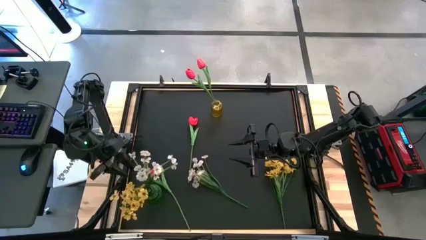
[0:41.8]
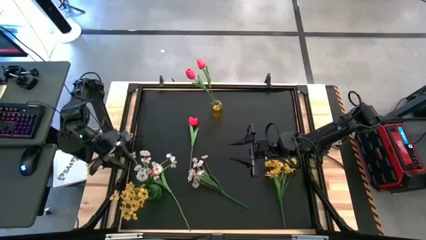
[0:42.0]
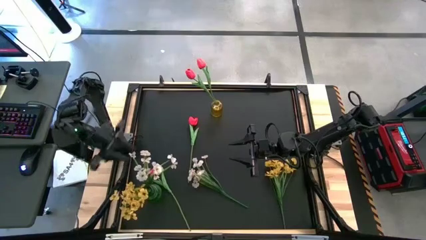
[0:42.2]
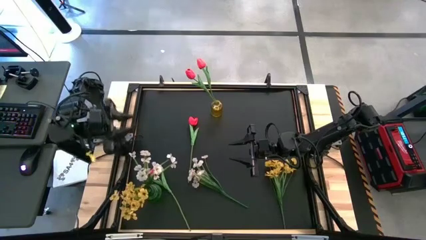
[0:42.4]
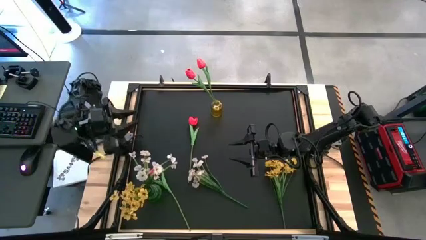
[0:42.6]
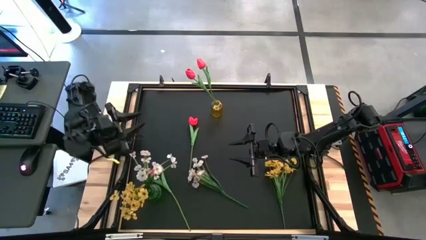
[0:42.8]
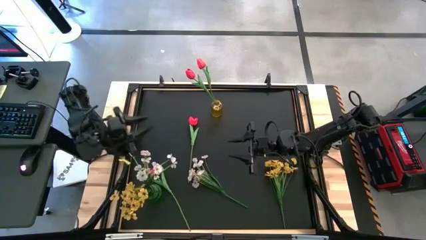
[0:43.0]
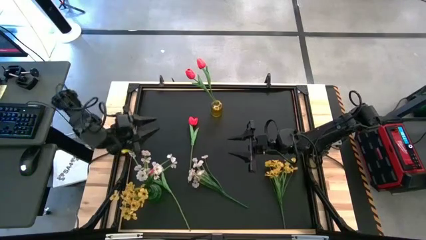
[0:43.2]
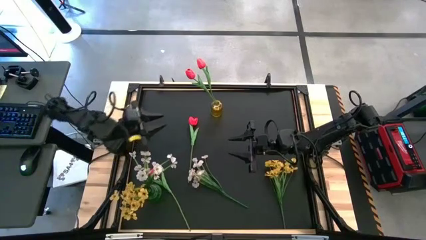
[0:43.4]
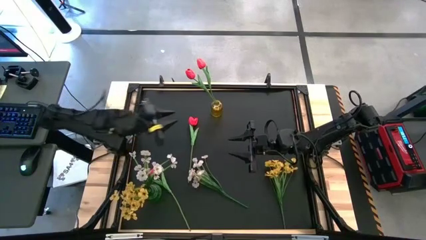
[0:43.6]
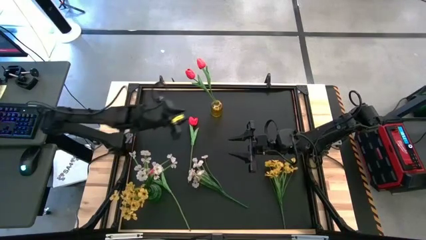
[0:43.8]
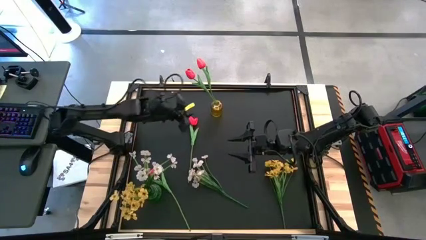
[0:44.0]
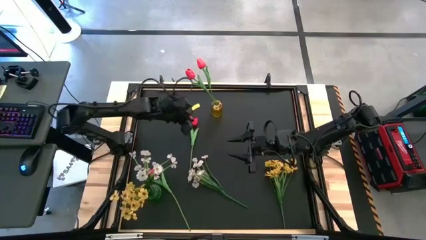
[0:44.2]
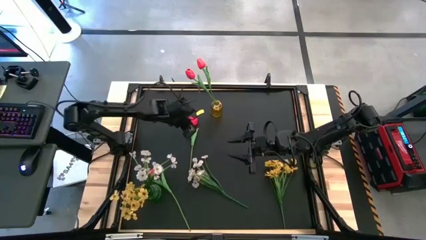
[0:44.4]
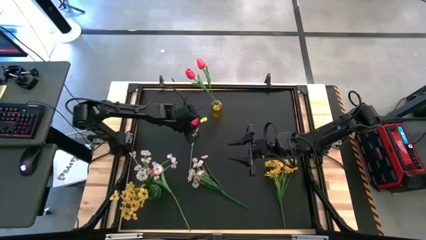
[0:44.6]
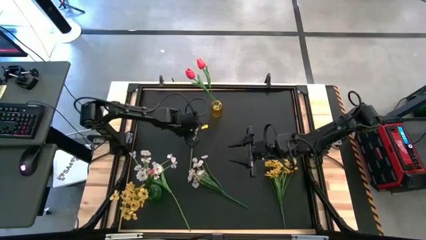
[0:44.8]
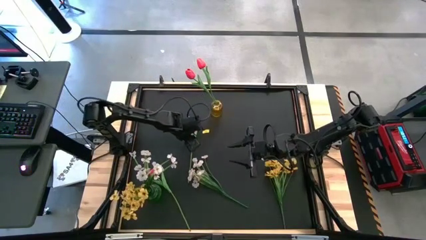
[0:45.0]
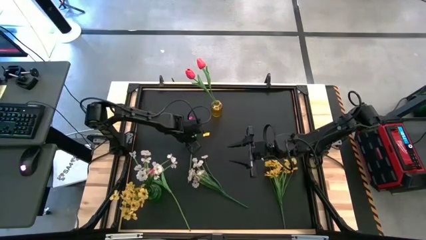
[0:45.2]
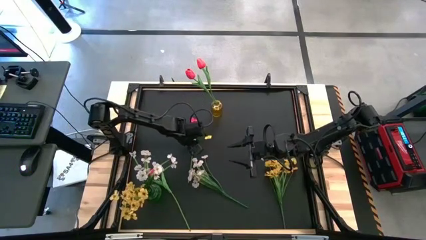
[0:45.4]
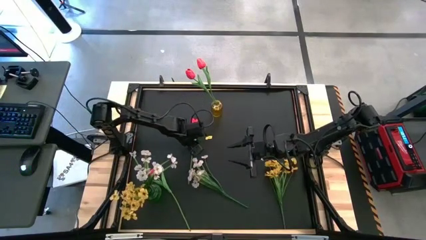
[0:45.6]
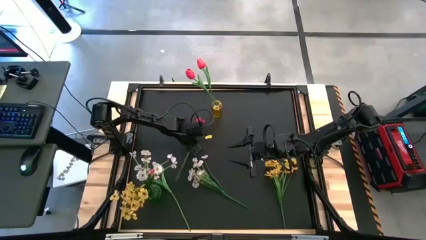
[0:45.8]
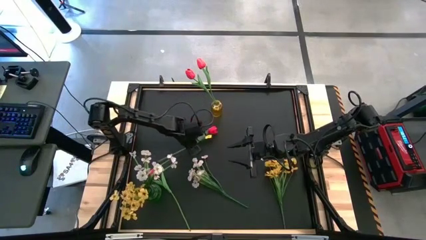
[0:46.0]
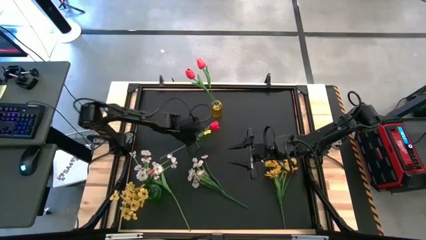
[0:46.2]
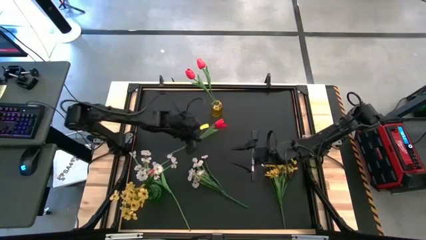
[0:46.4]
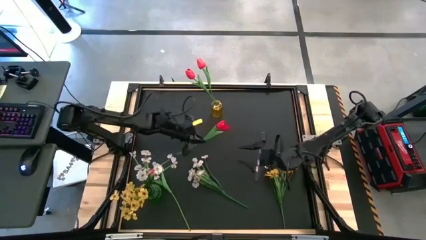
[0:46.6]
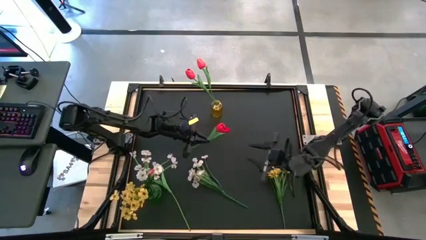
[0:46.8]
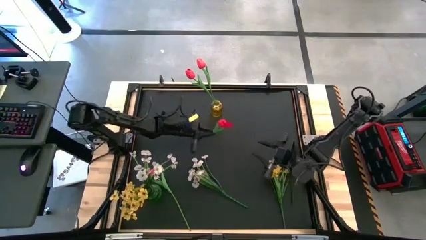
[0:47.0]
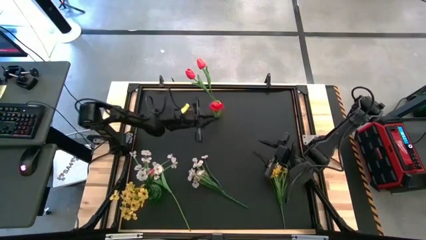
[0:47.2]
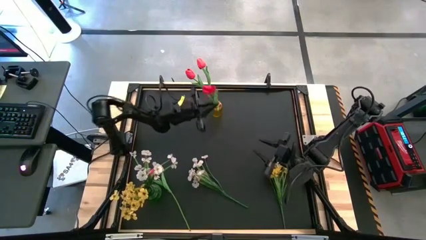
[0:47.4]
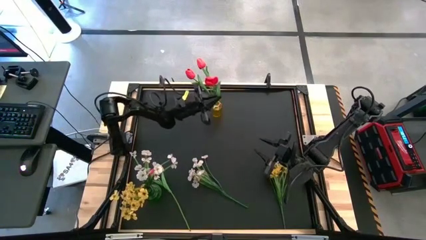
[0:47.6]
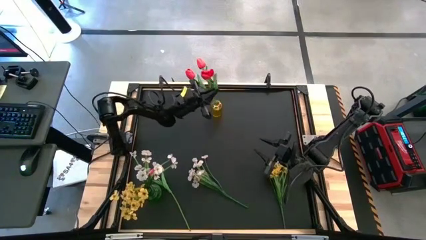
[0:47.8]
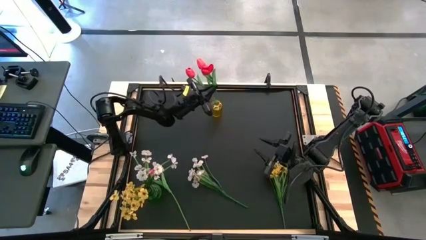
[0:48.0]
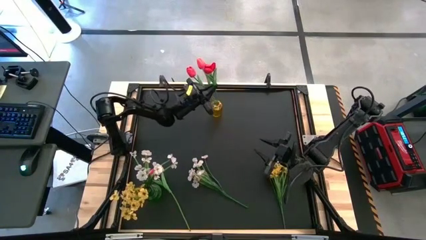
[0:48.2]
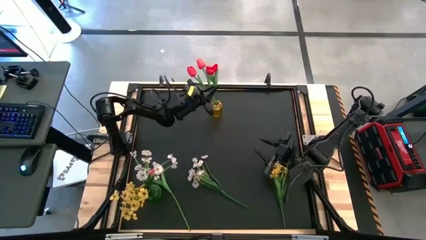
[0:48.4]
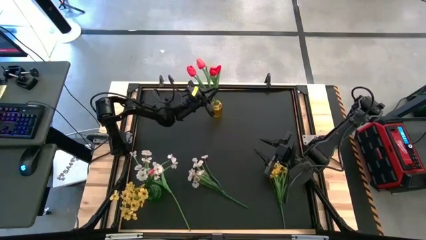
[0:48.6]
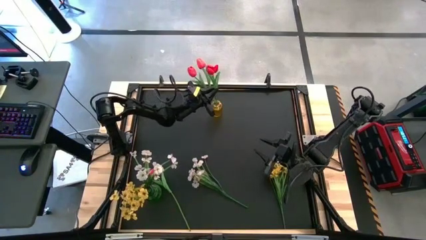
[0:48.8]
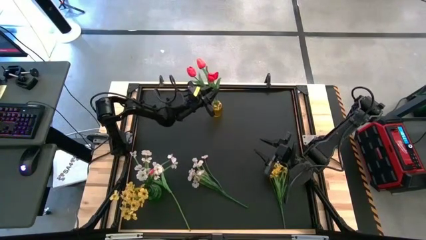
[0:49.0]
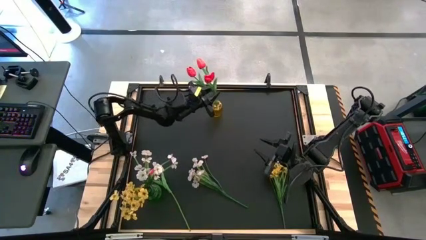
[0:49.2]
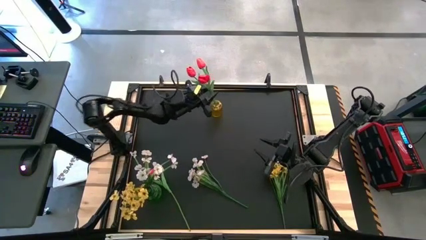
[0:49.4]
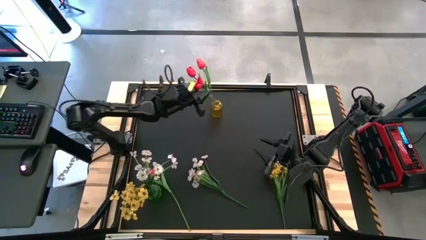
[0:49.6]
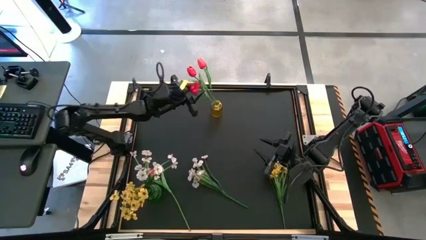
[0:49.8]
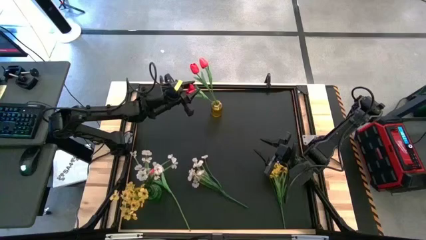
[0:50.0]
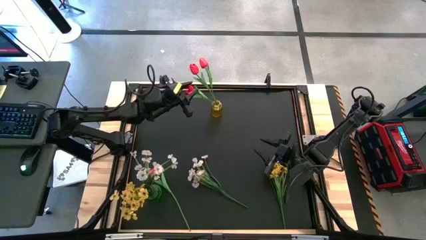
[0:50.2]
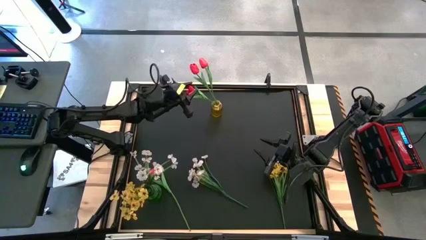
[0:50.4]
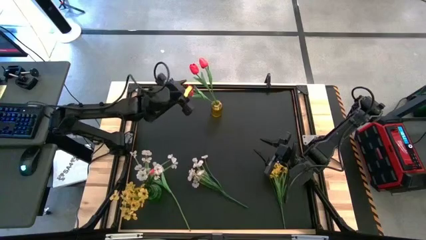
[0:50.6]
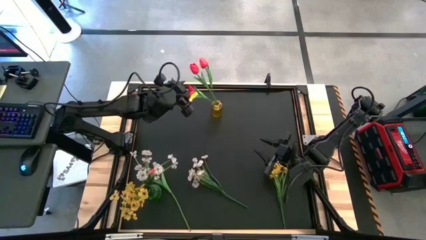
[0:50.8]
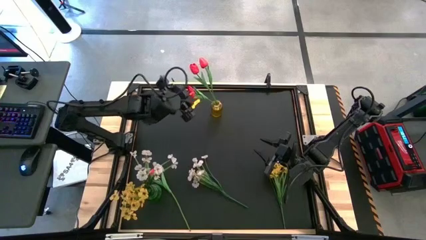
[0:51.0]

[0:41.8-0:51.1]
Task: Sort flowers into vase by color
Put the red flower into the yellow vase

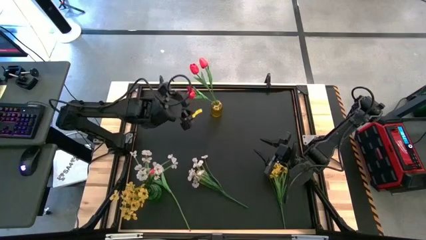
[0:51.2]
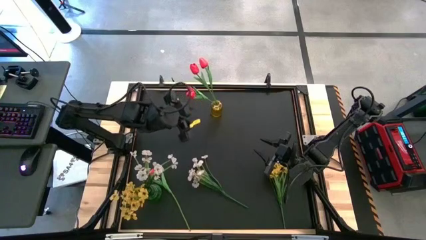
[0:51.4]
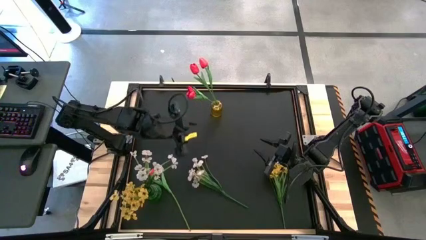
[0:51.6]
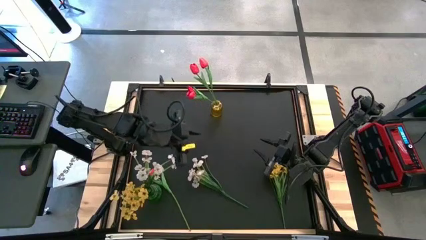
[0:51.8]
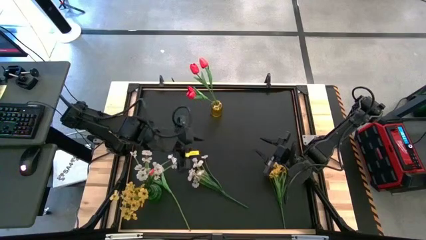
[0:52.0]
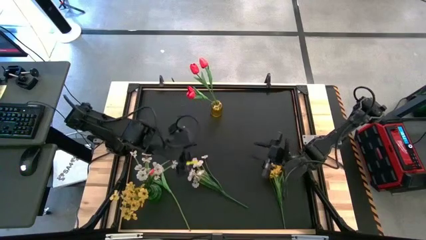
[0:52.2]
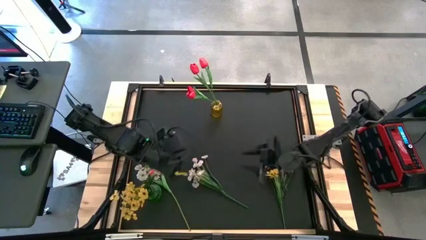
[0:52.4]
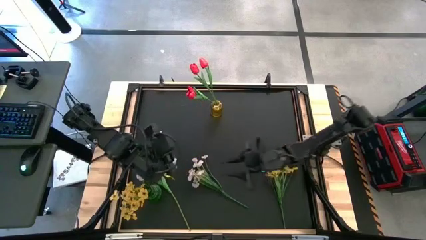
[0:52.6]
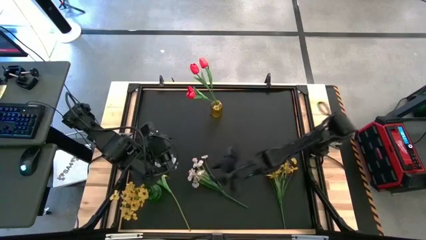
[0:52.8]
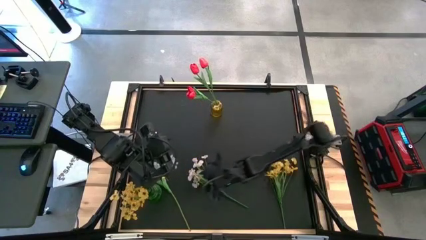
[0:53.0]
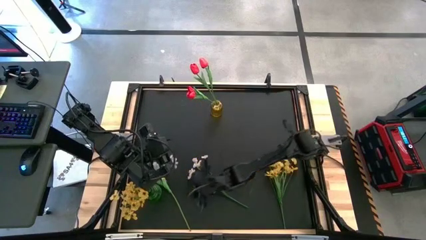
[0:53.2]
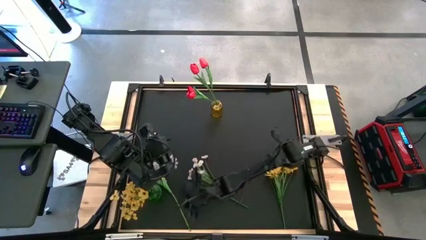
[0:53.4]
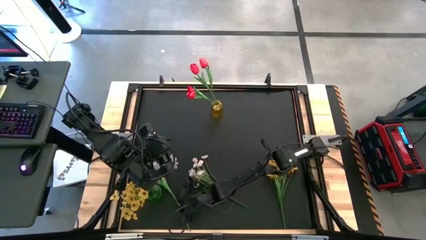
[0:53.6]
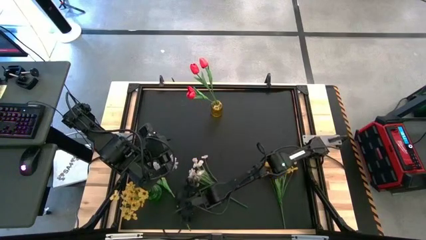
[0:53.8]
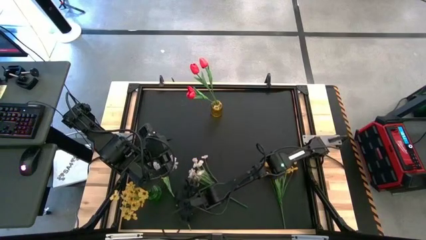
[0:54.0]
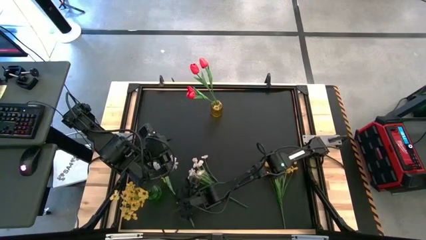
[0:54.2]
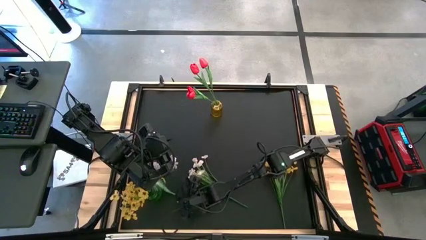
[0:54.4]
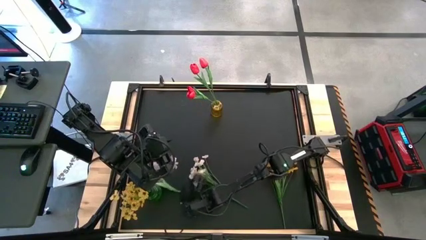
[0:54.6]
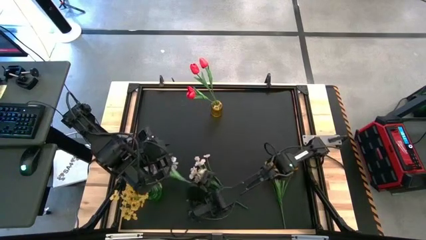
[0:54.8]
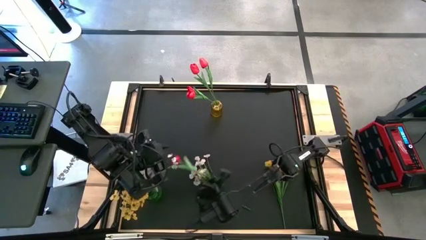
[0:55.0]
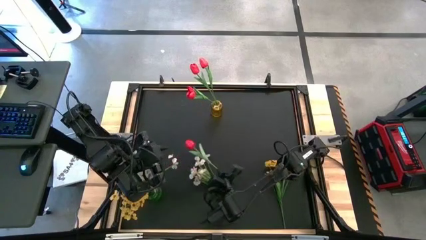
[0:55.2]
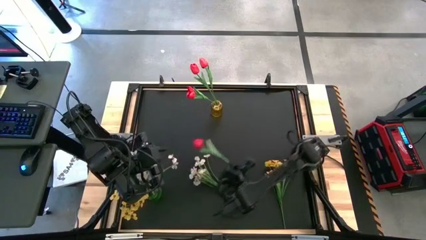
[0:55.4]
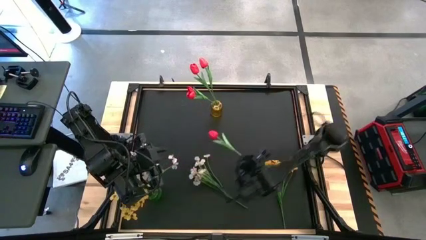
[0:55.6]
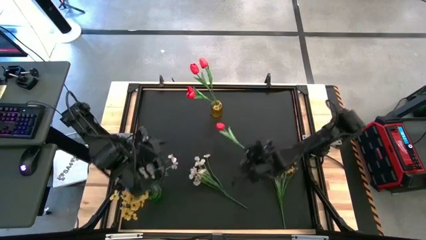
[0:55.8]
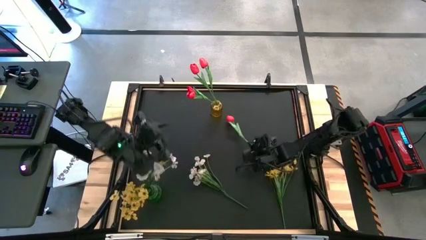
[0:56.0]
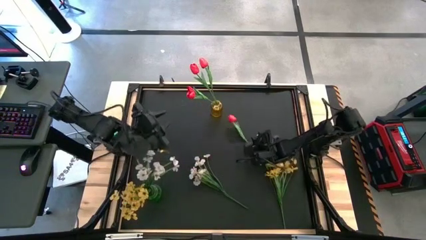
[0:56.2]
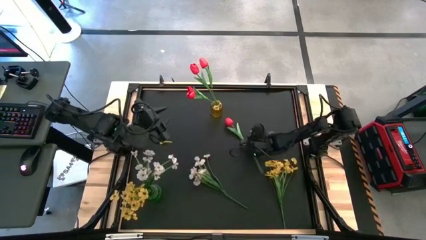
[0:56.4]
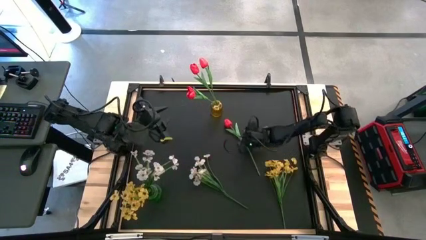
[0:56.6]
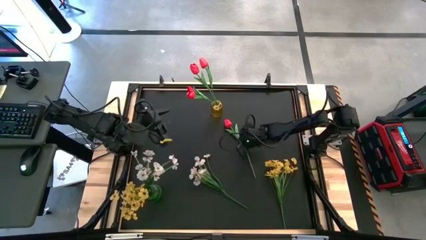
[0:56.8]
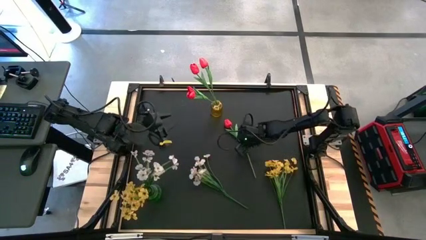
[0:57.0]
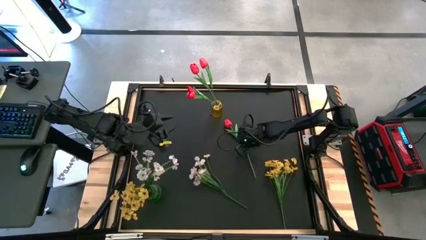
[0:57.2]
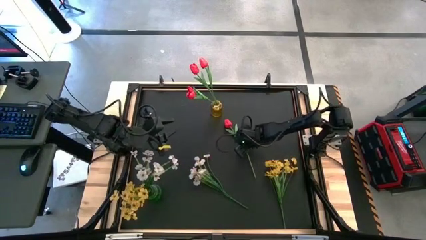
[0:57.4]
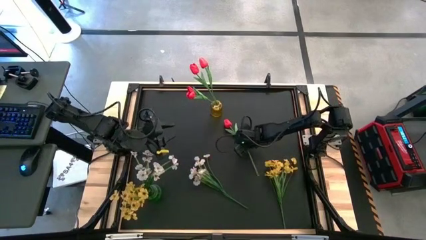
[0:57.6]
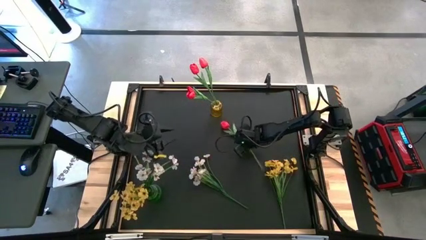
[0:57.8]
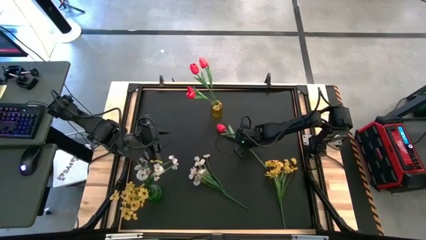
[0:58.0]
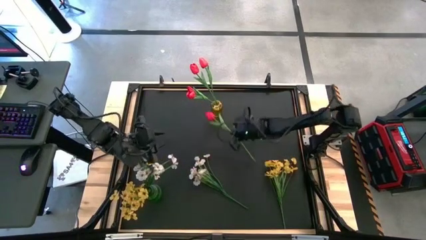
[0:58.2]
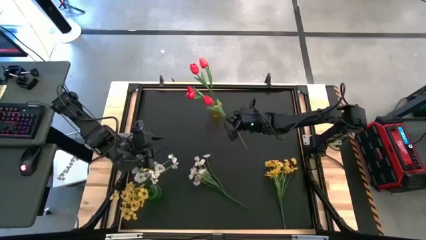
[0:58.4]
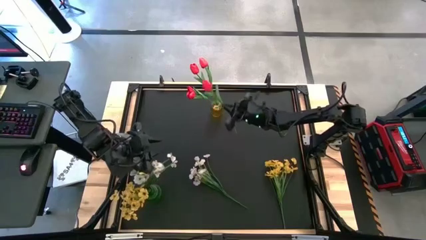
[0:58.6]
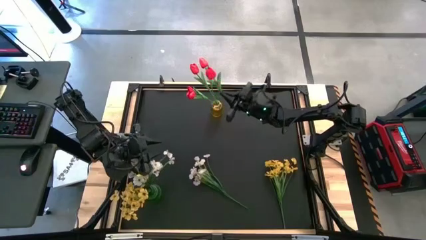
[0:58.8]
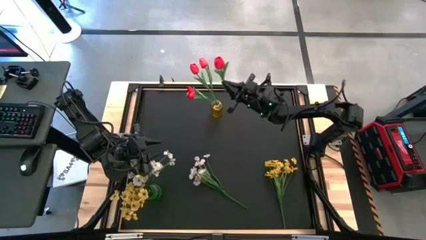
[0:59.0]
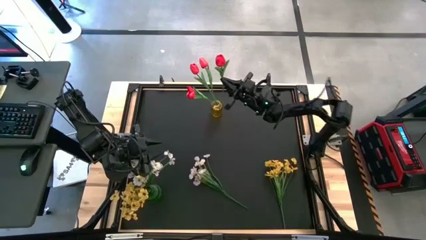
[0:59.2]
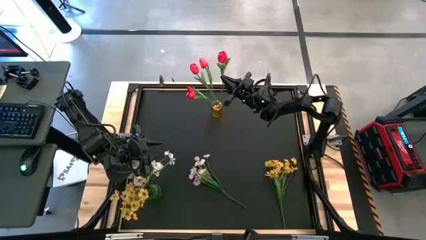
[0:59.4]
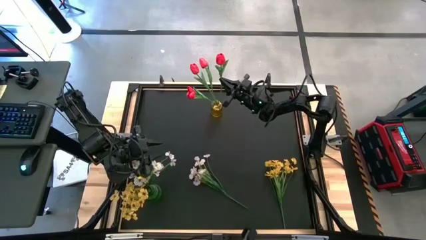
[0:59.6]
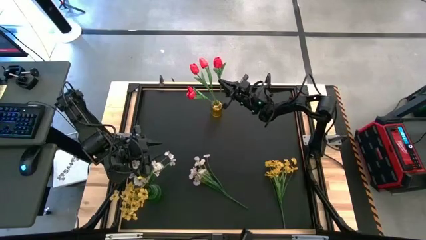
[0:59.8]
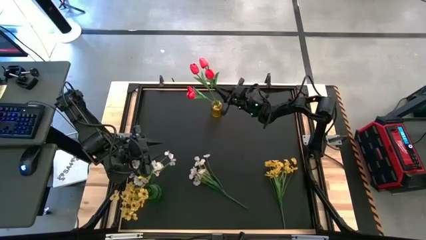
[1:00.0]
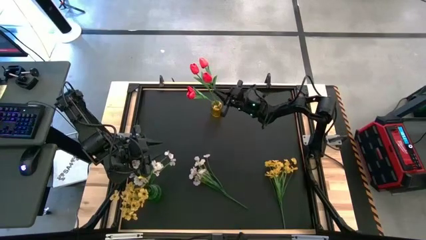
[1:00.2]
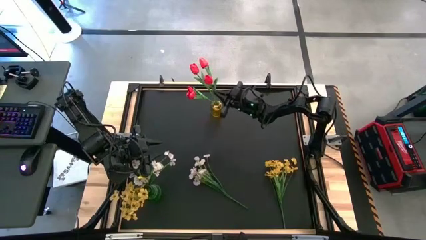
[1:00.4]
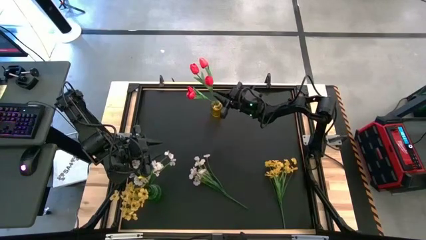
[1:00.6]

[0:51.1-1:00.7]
Put the red flower into the yellow vase
